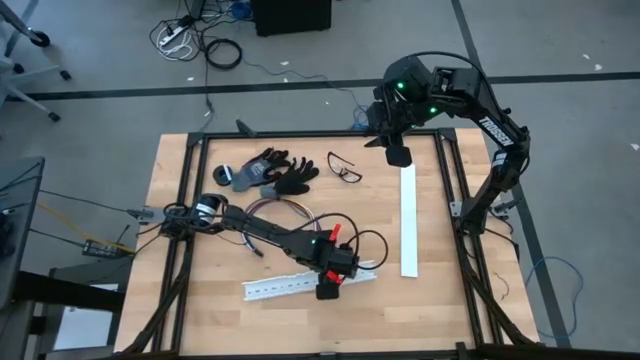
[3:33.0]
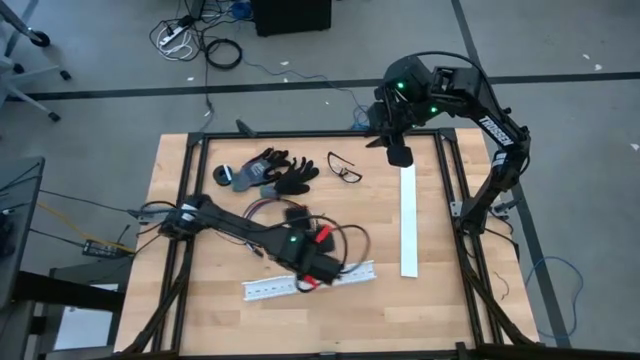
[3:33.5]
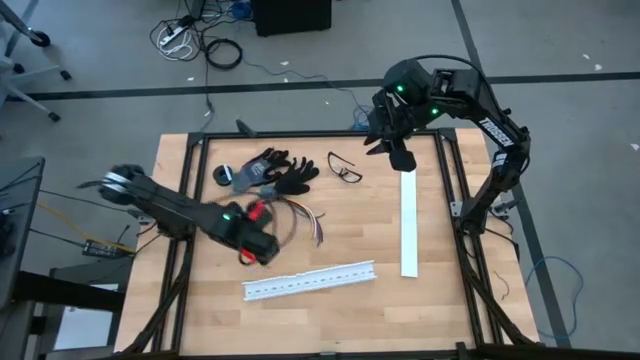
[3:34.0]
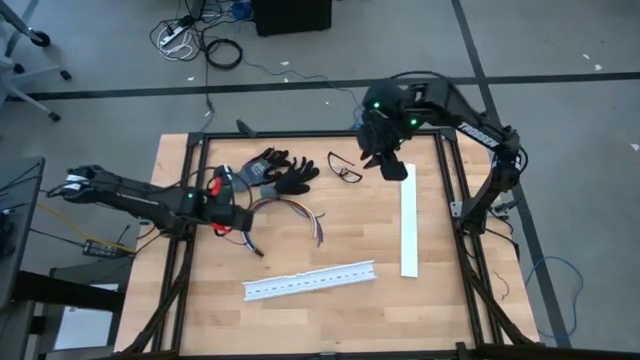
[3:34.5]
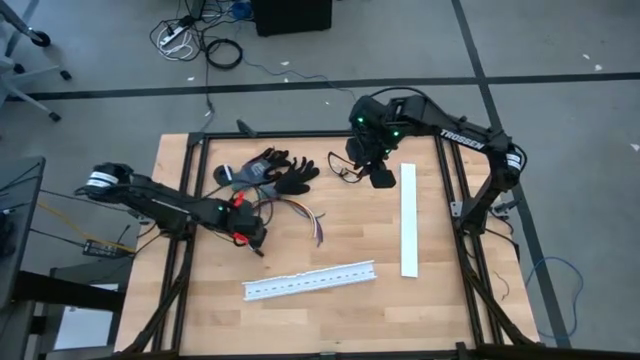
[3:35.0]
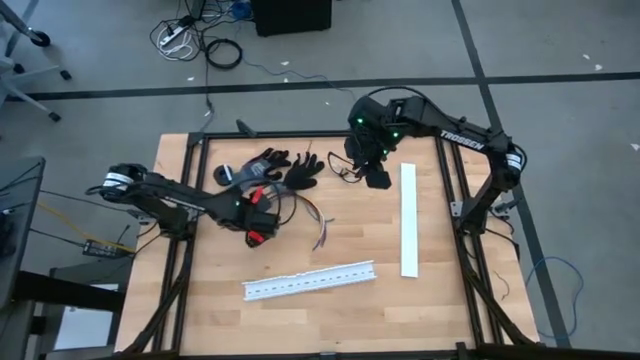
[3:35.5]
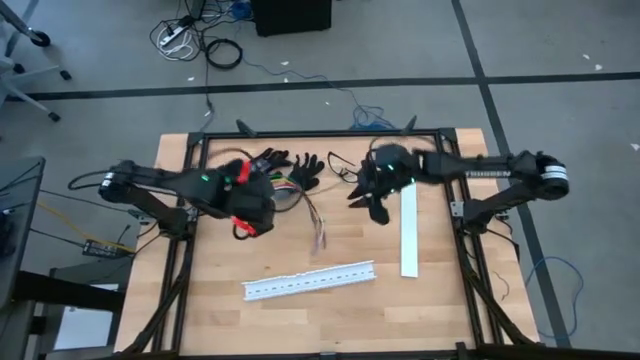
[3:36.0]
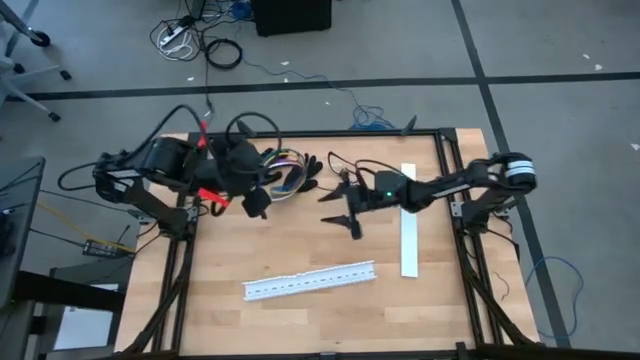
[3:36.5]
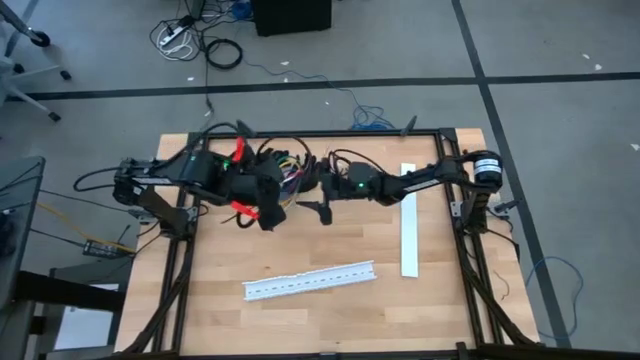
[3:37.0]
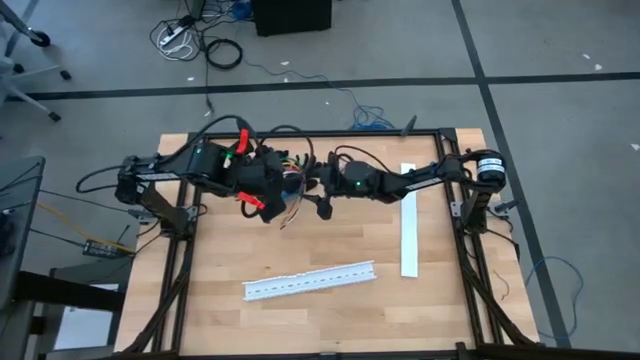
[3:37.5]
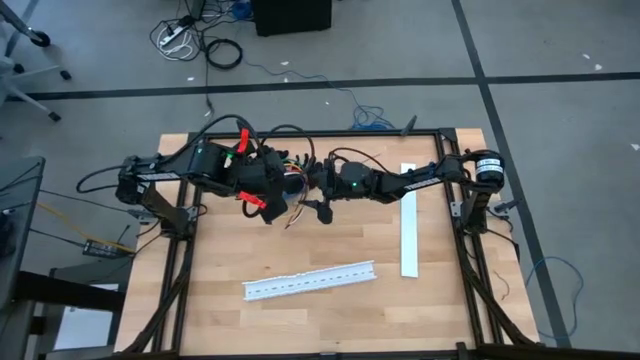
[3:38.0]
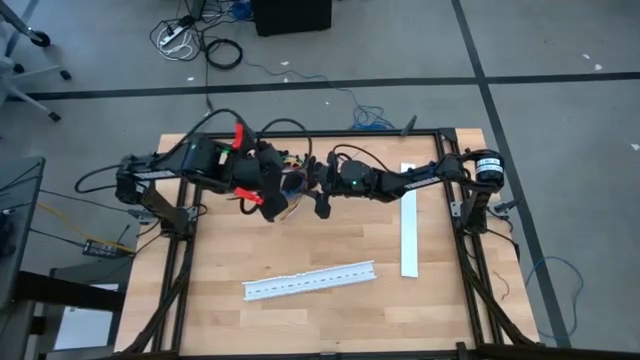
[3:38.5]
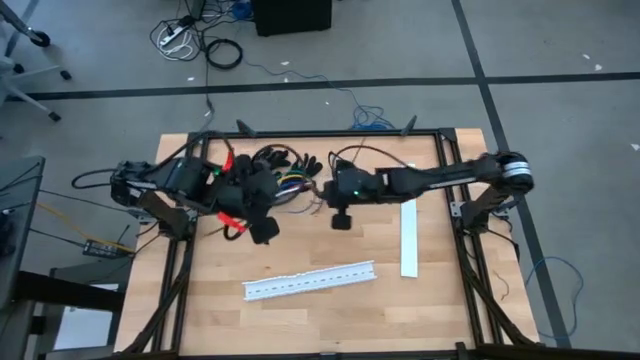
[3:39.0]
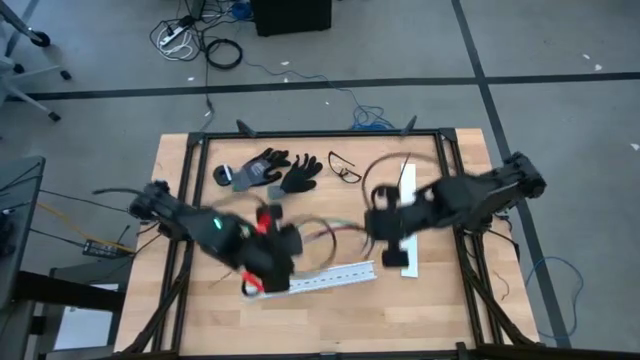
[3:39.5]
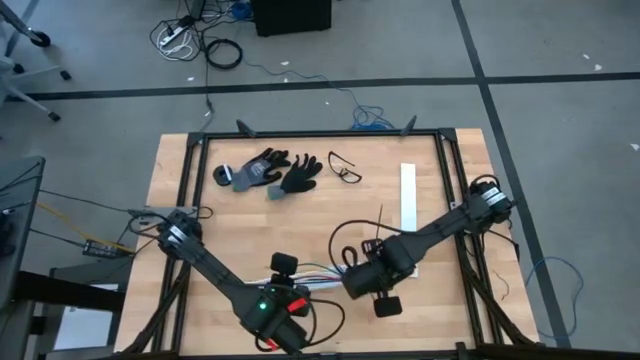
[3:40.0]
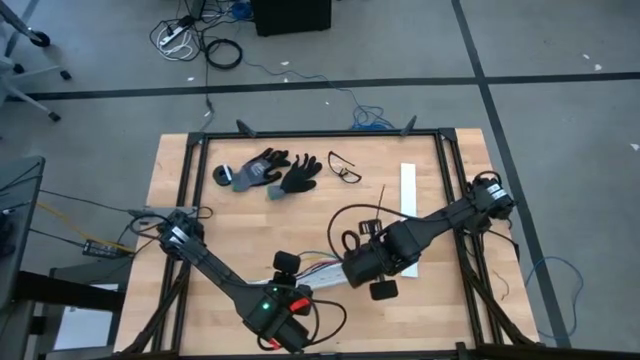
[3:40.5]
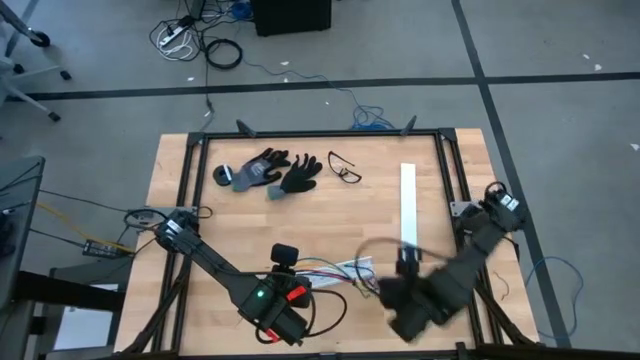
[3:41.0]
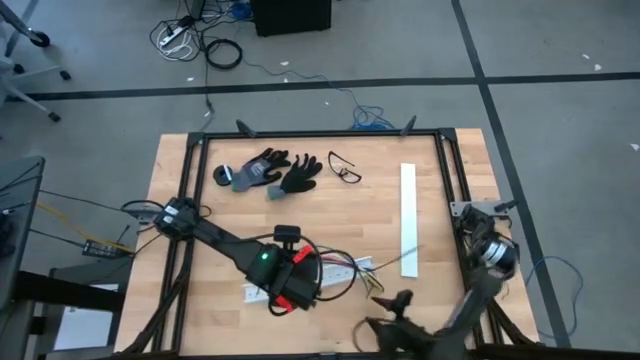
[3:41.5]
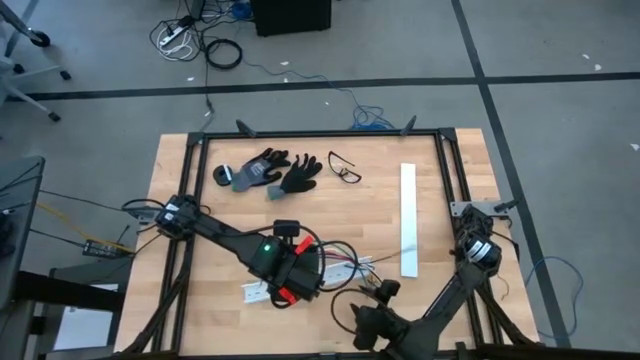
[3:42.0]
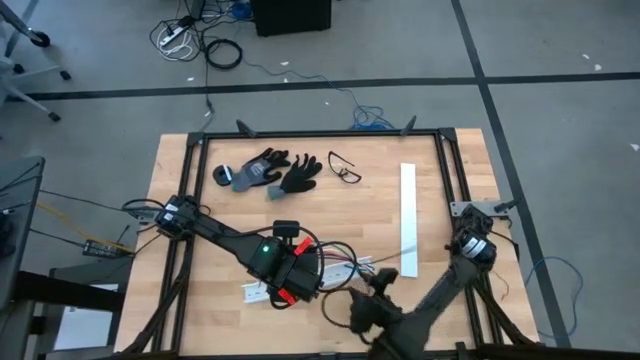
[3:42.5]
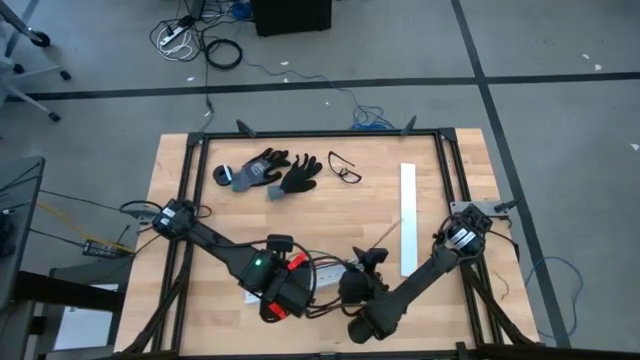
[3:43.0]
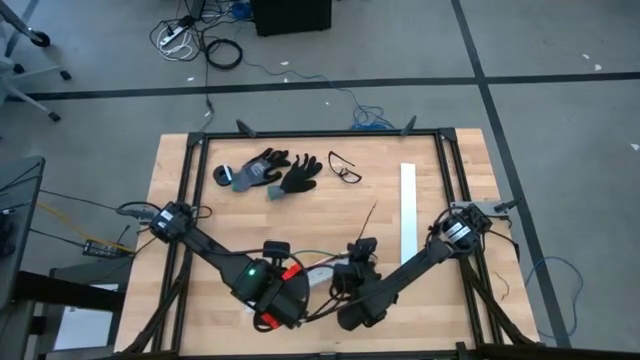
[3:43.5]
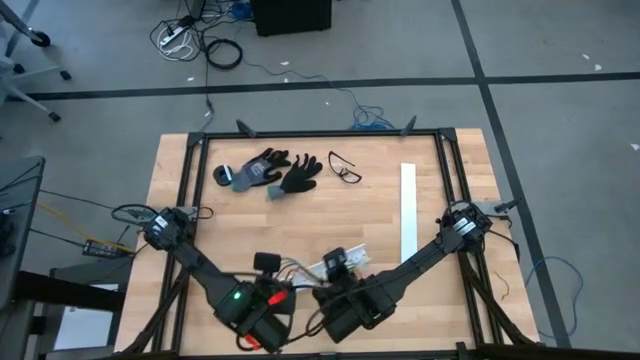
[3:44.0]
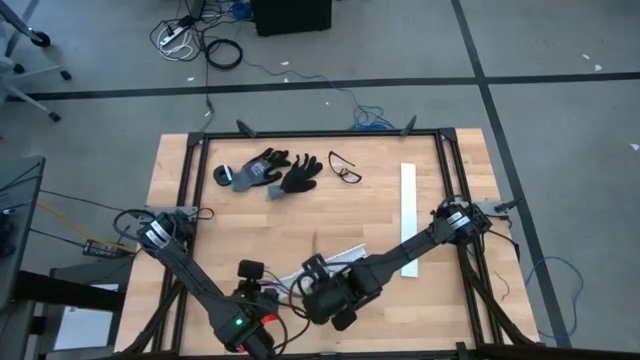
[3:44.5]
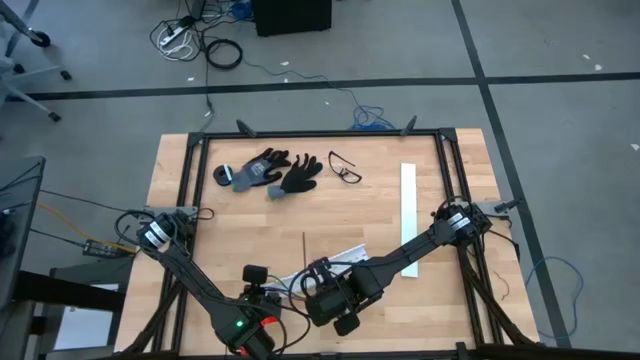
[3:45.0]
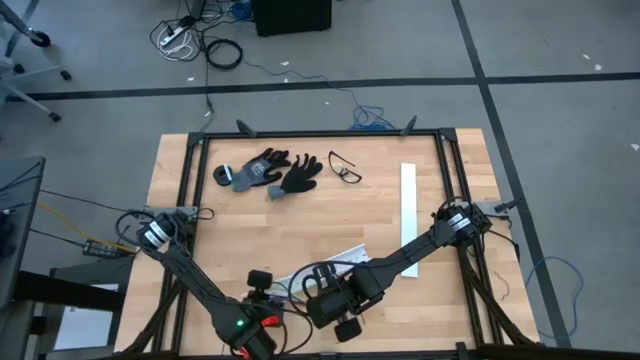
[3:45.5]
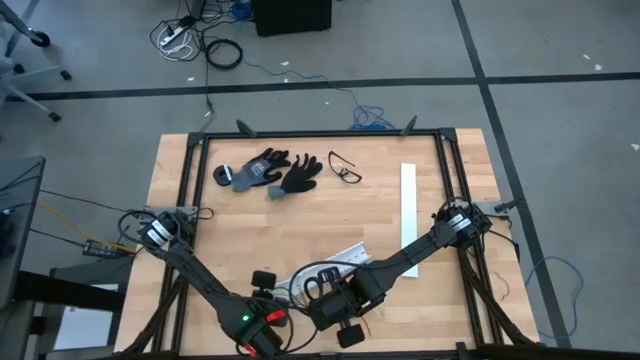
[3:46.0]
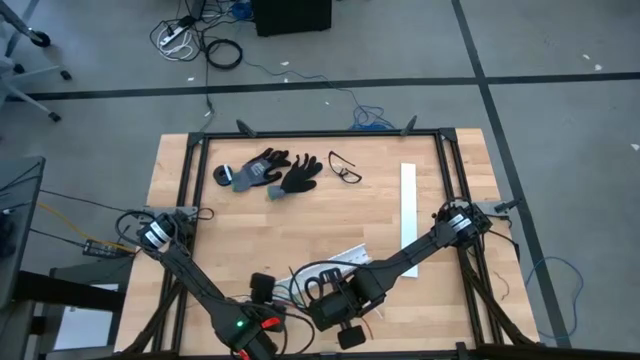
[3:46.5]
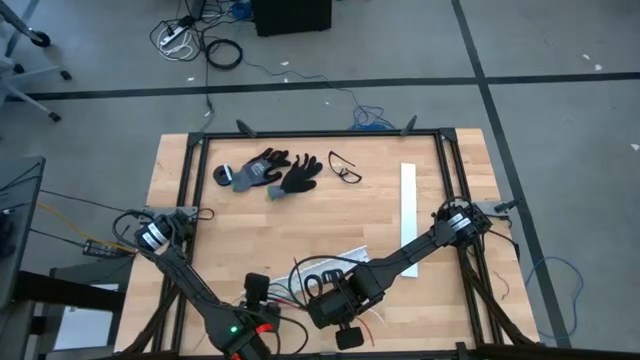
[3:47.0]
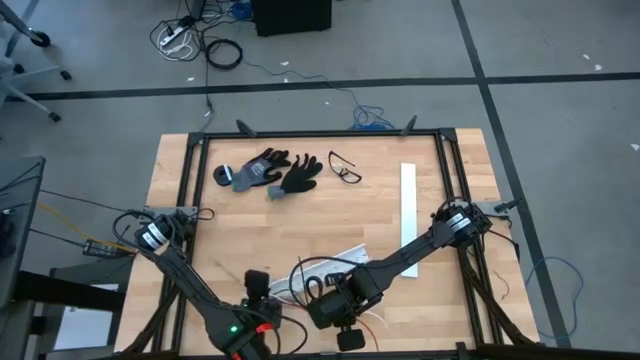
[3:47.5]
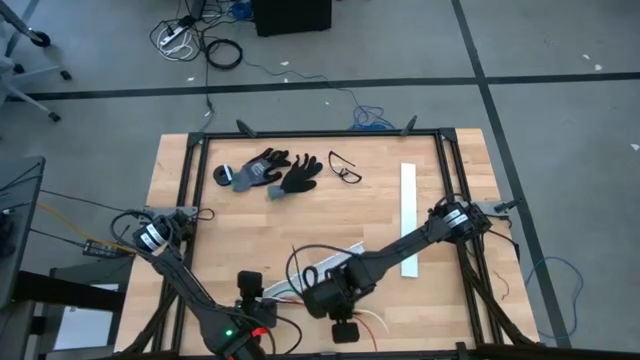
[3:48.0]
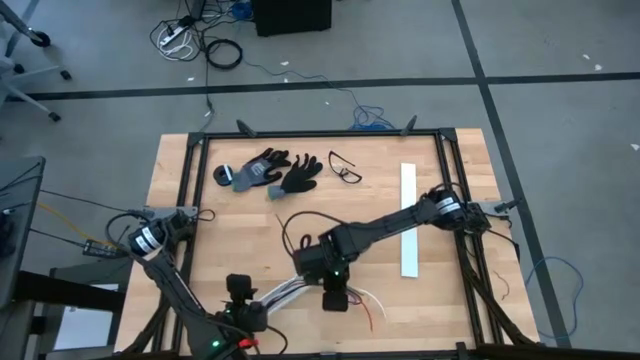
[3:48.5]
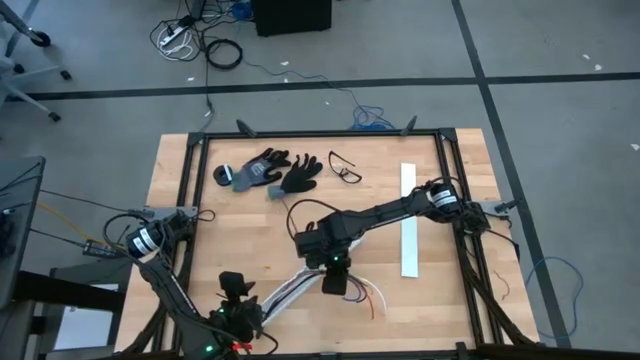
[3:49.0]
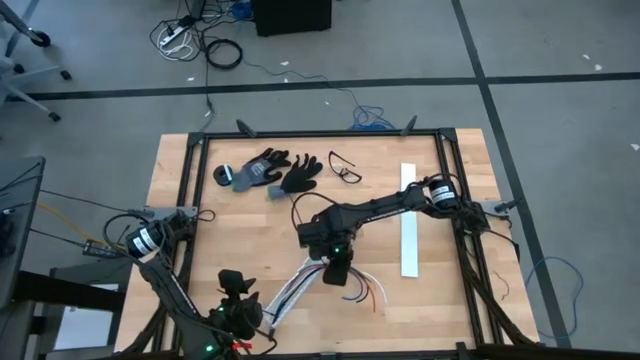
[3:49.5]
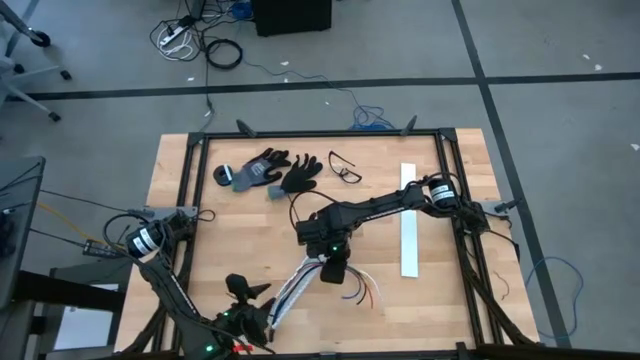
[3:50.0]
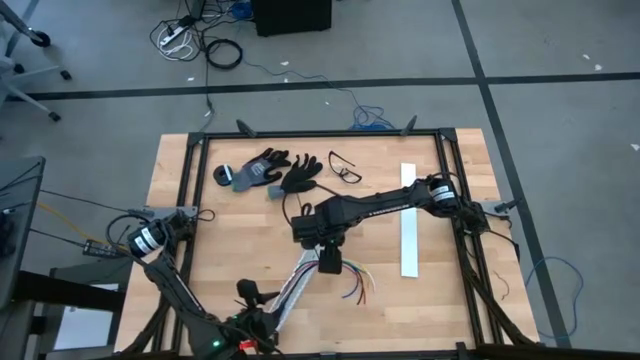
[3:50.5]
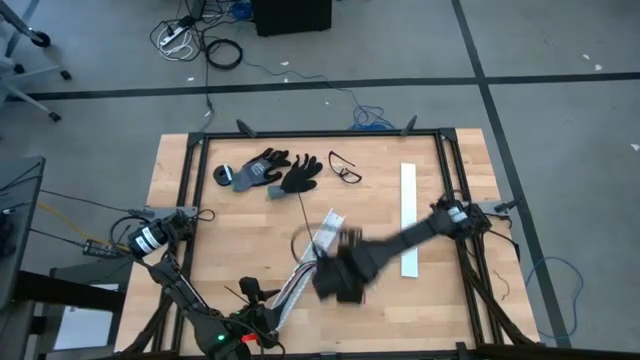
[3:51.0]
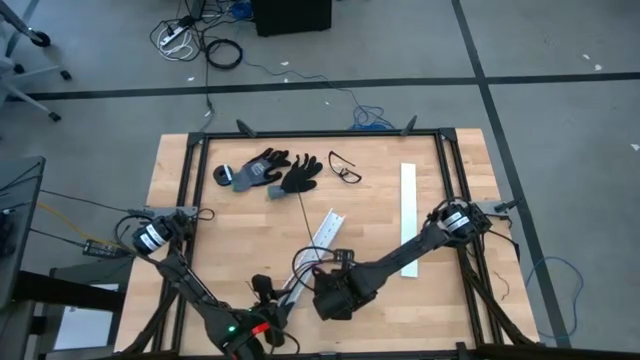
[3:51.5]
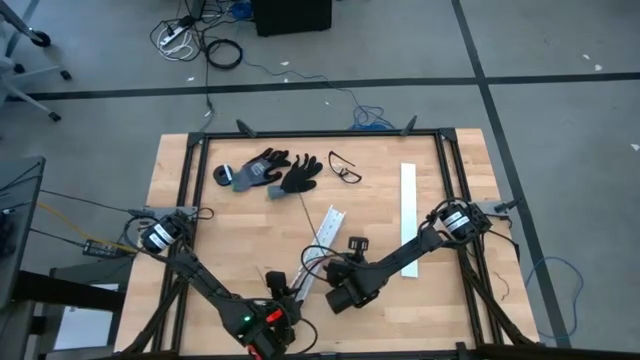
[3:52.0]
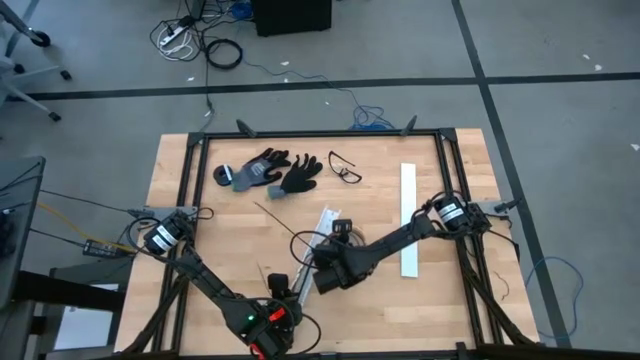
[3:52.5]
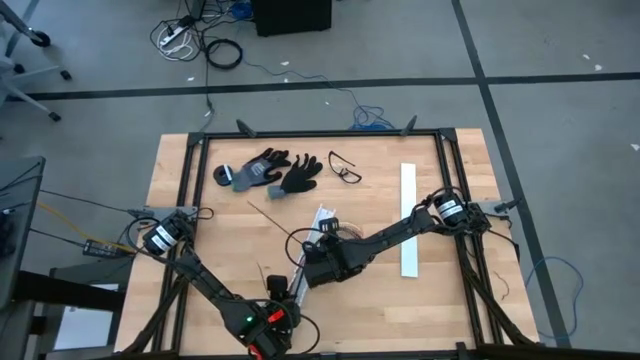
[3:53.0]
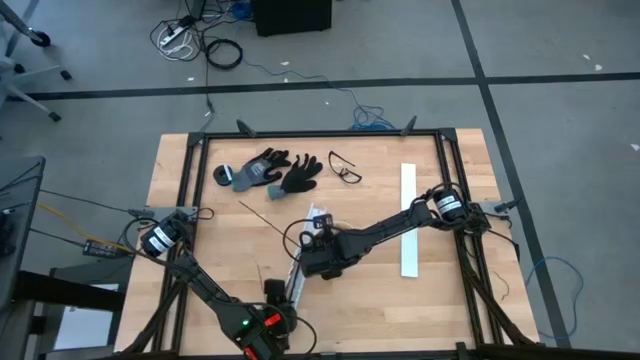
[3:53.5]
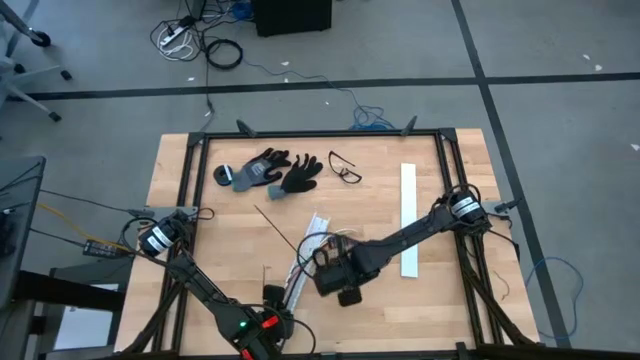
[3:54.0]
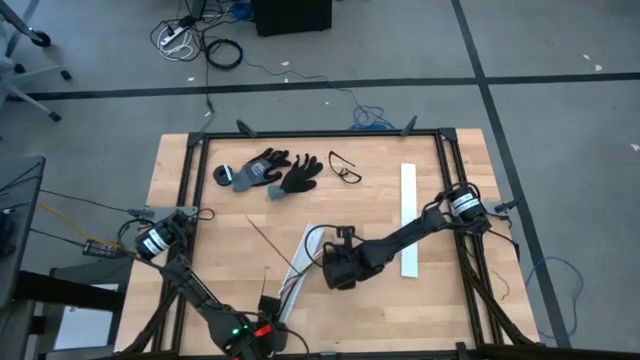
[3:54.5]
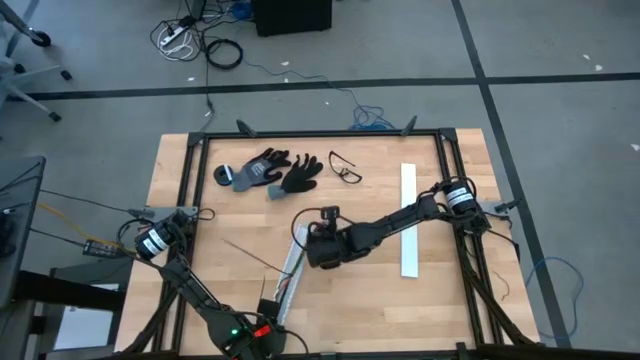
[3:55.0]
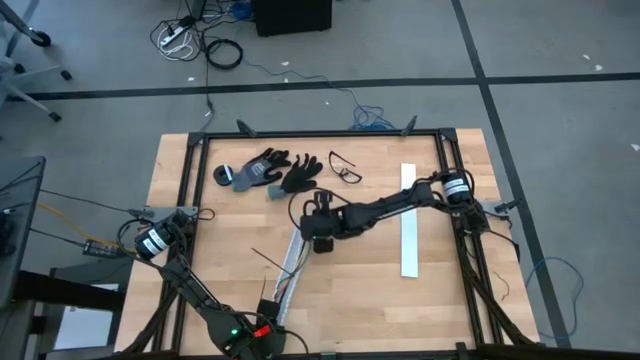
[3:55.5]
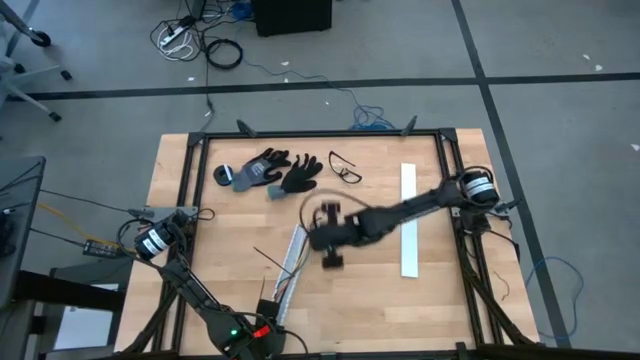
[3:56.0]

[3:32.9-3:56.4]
Task: Ziptie cables
Put the ziptied cables in a white cable duct
